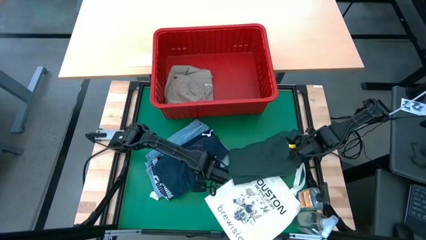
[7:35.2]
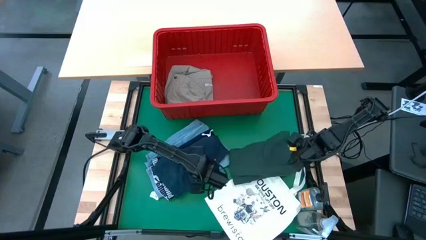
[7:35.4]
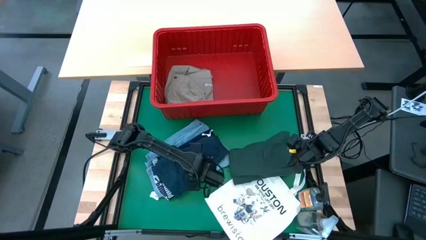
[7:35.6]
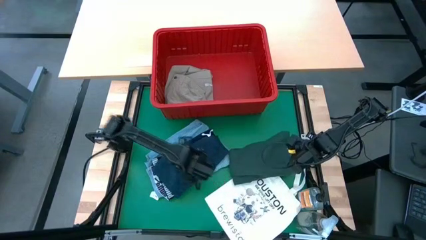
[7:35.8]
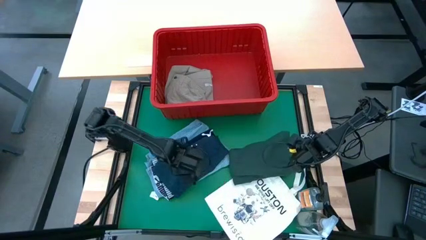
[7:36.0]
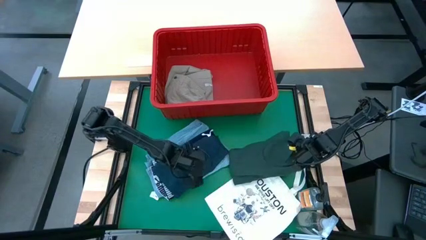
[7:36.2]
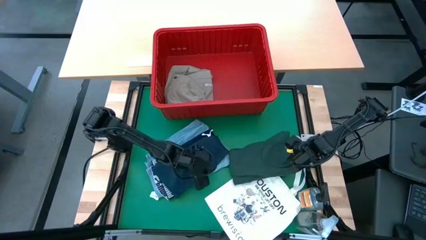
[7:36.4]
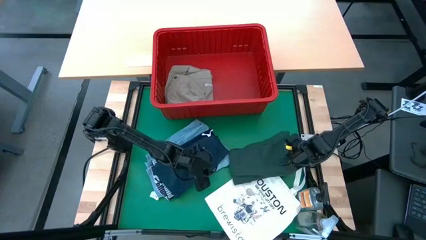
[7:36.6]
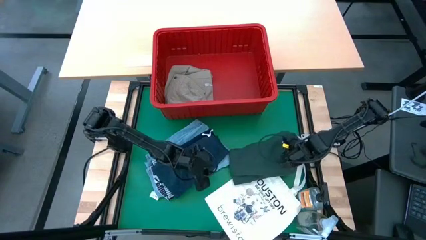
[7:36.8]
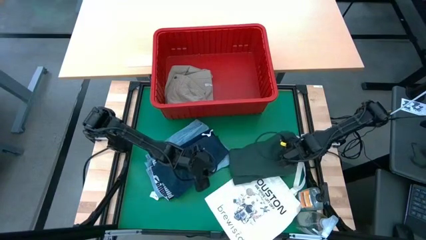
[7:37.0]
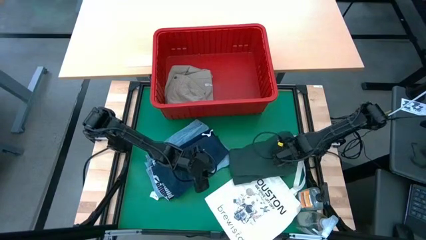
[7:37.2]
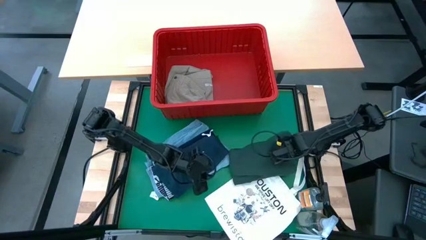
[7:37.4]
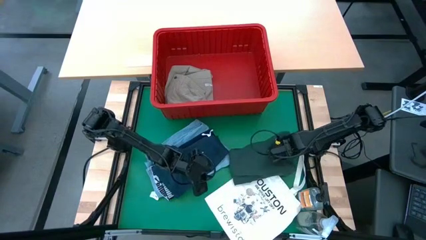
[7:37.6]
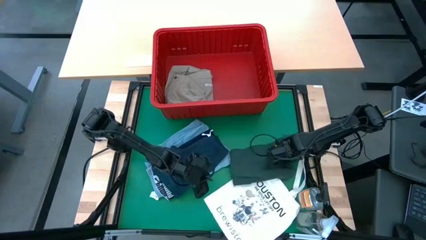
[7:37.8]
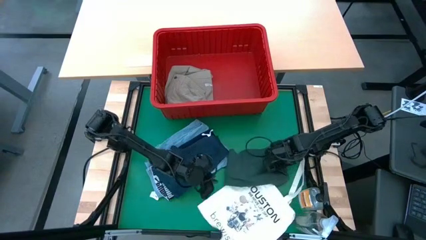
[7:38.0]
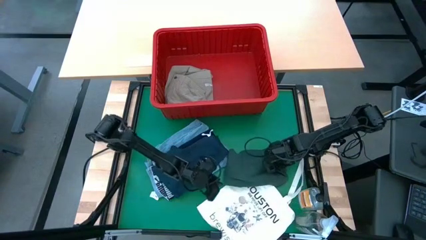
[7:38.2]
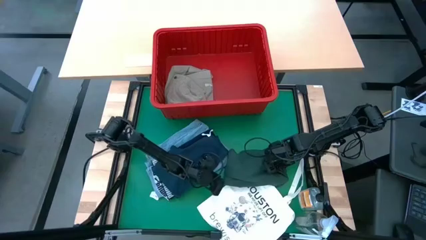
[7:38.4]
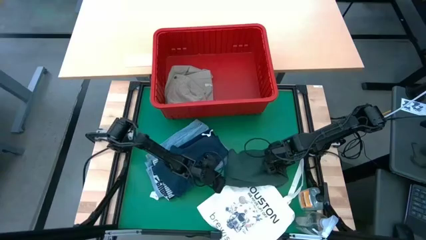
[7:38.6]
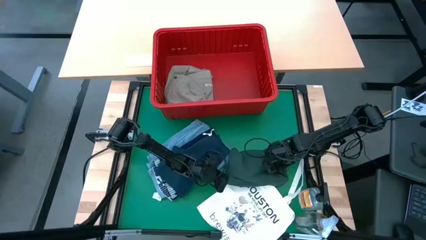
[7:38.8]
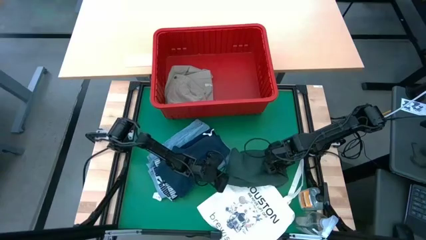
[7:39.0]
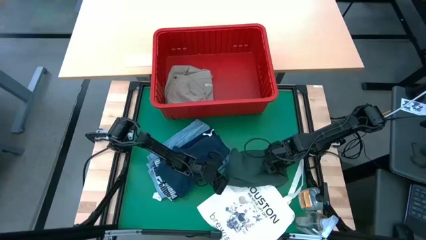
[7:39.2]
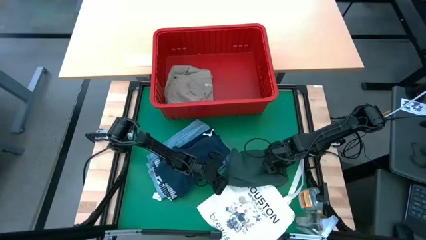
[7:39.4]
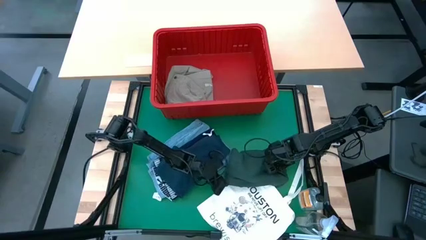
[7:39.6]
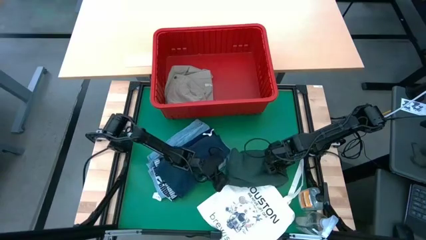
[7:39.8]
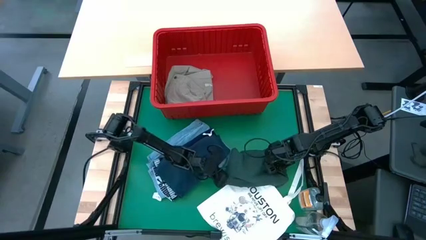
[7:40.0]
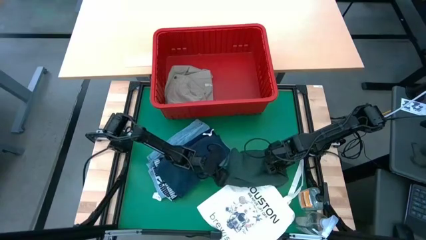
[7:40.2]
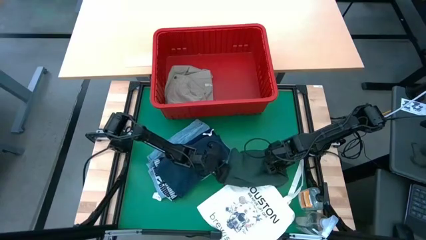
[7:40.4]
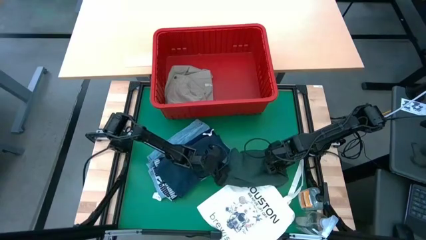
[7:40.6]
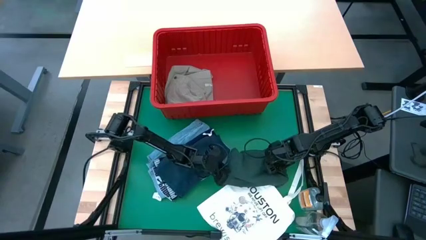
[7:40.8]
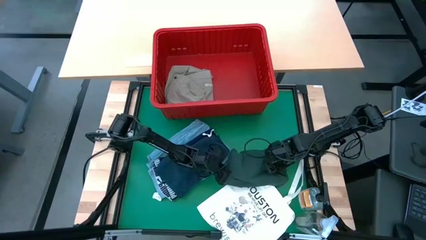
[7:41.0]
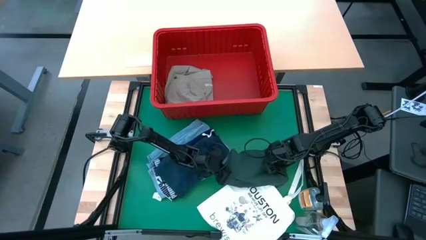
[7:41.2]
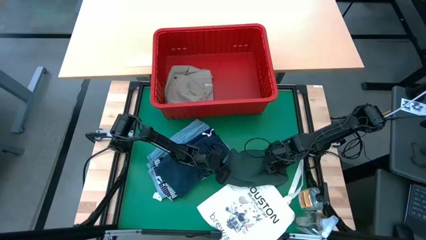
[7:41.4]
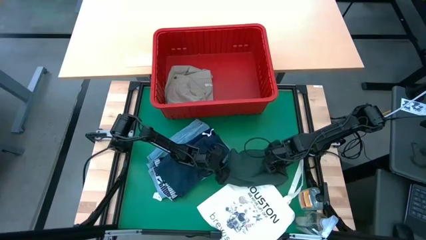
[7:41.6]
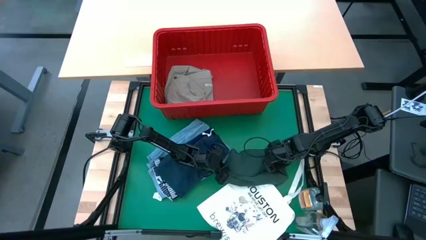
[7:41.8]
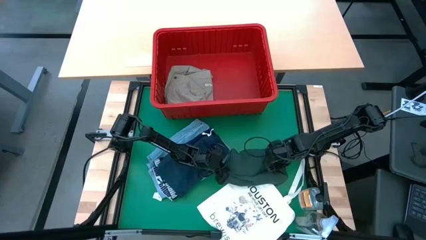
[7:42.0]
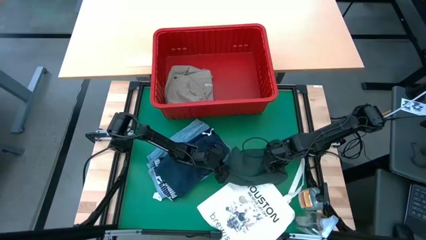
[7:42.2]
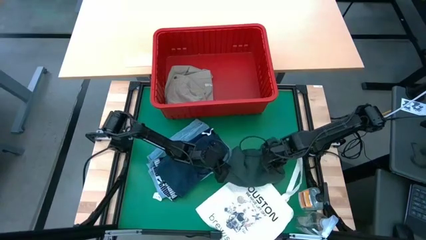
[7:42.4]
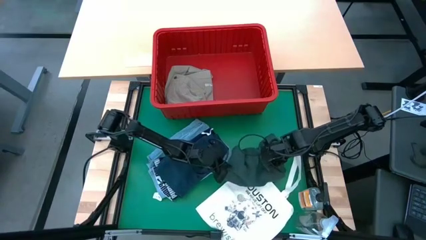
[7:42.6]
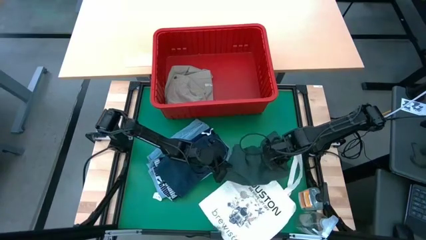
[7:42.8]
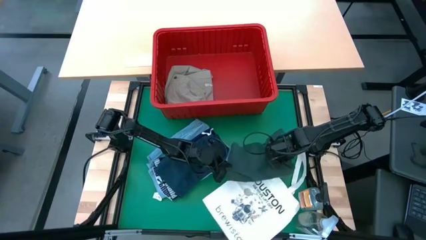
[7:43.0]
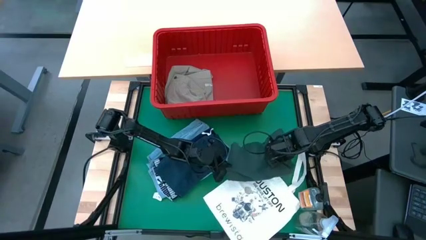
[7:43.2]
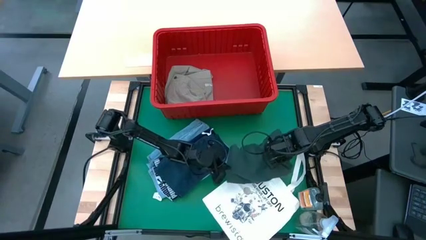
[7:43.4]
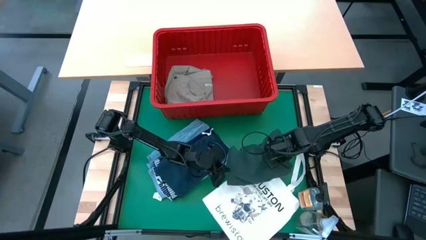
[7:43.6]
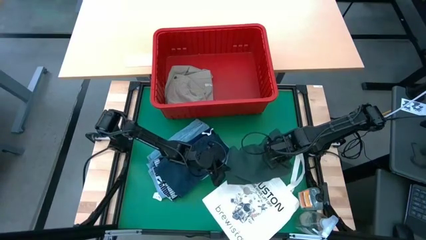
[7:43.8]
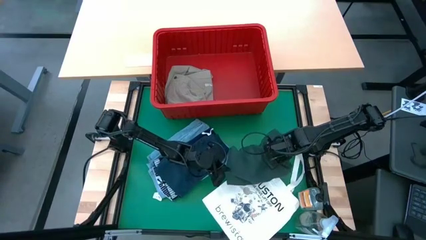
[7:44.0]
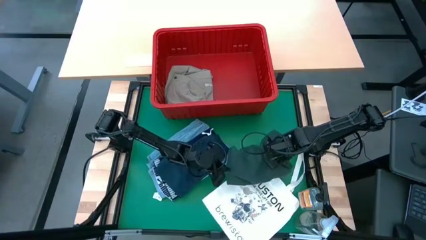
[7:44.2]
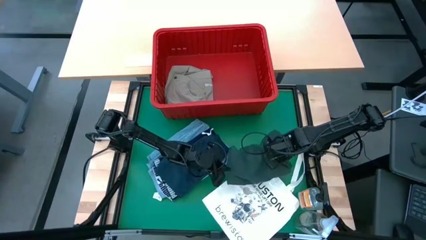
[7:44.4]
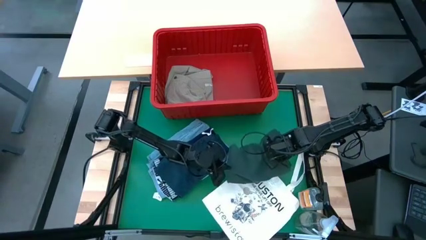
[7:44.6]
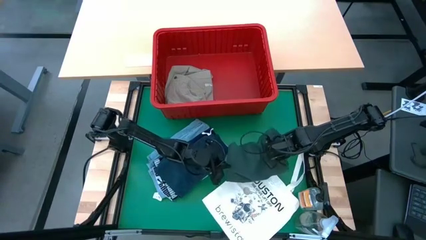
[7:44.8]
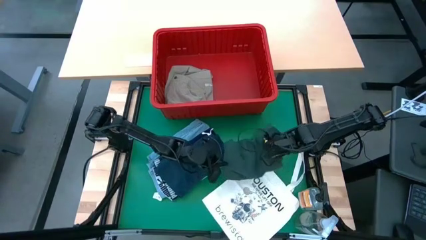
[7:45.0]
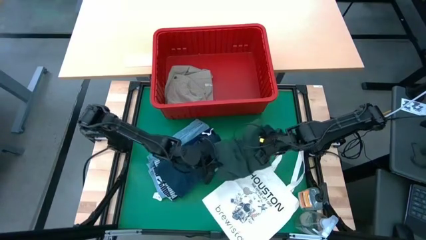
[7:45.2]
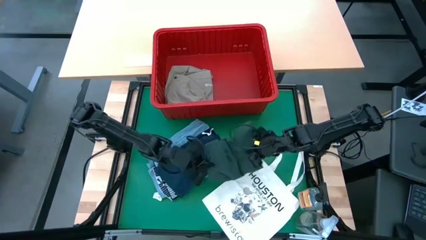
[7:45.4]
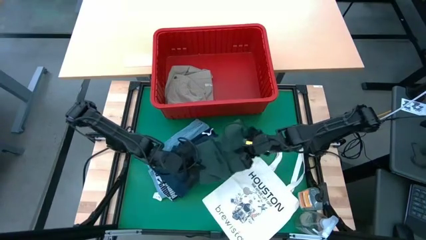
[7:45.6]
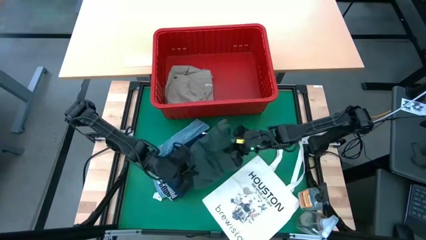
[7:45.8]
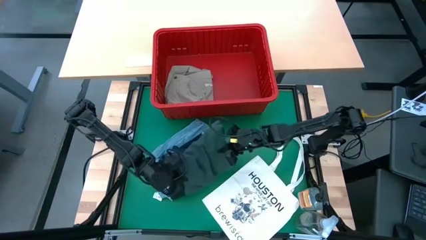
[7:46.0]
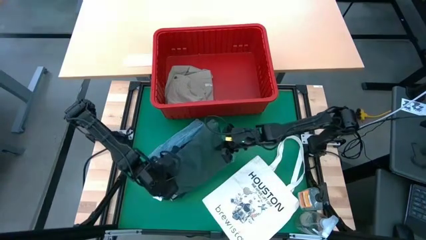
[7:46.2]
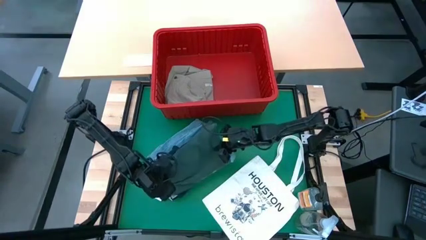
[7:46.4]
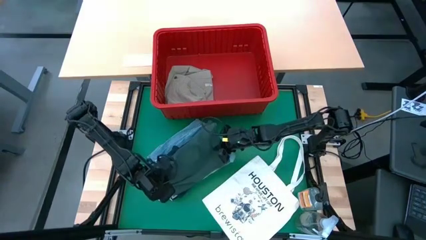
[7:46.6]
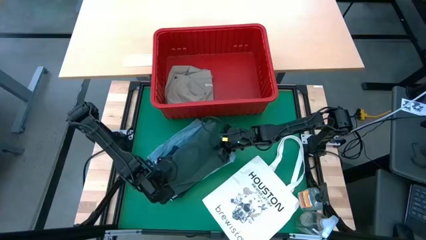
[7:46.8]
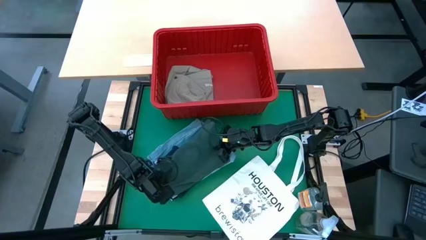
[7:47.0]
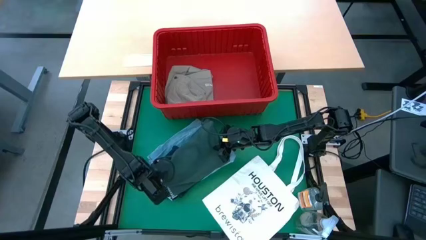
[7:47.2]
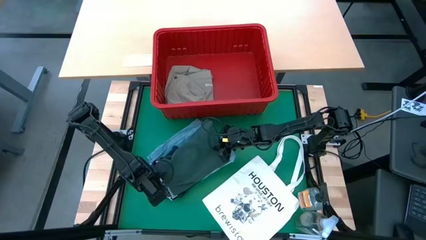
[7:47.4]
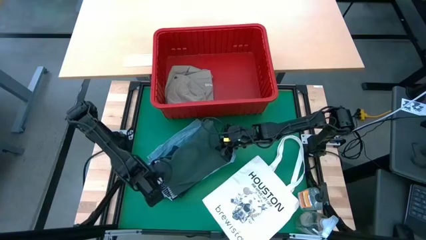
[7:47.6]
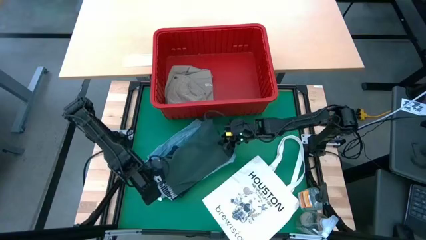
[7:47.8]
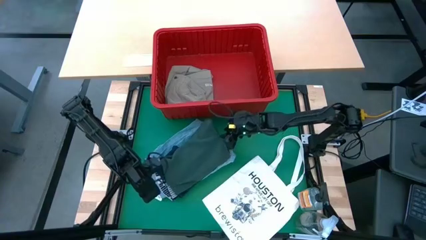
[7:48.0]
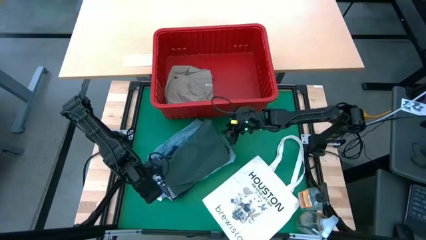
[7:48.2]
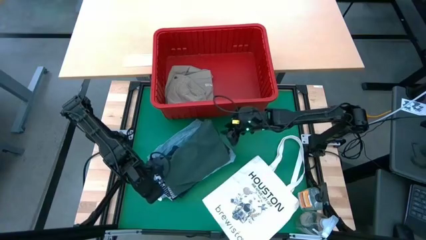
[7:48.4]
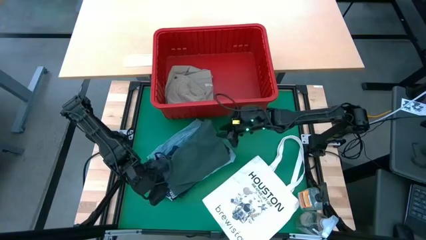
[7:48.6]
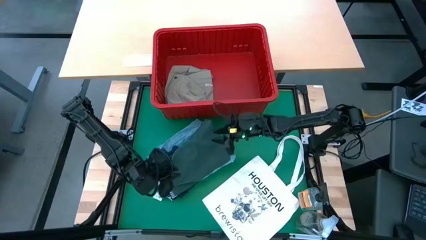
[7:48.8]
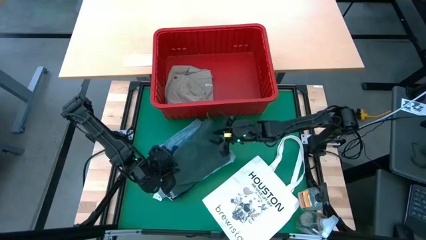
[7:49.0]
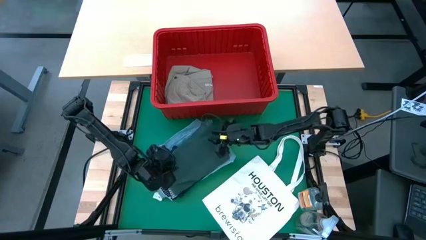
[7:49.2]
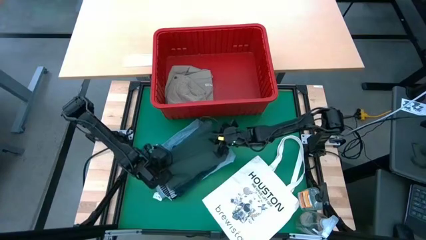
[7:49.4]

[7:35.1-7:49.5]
Task: Fold Laundry from Bin
Stack the dark green shirt on top of the gray shorts
